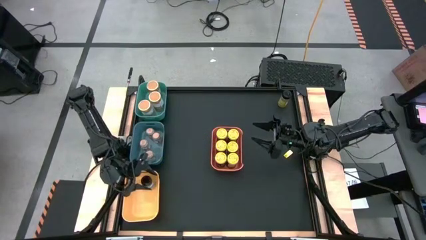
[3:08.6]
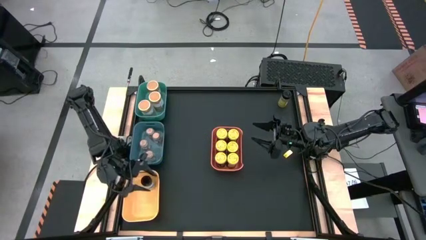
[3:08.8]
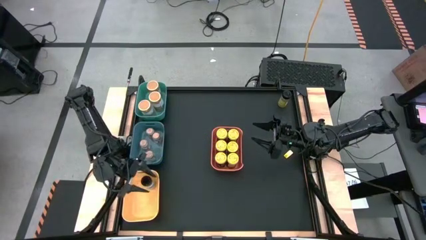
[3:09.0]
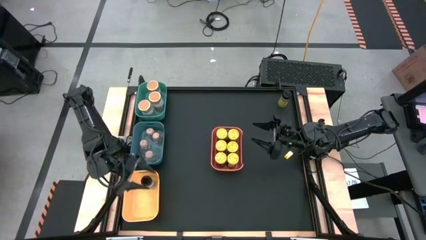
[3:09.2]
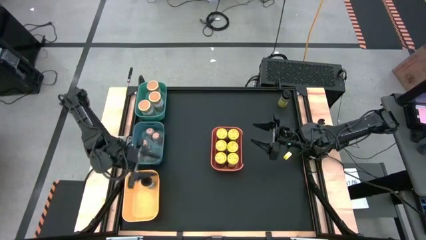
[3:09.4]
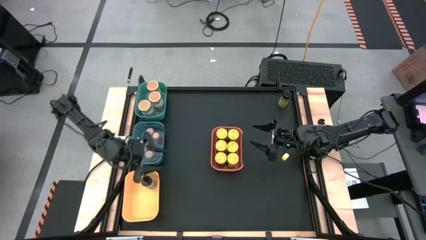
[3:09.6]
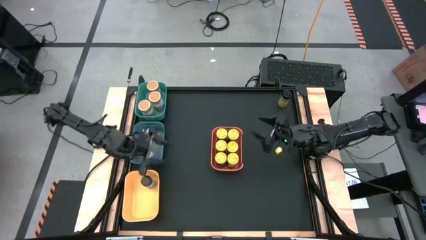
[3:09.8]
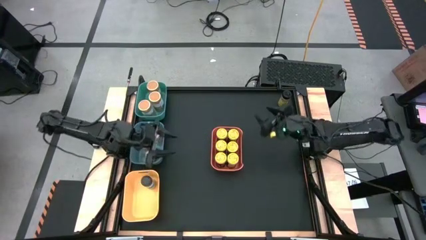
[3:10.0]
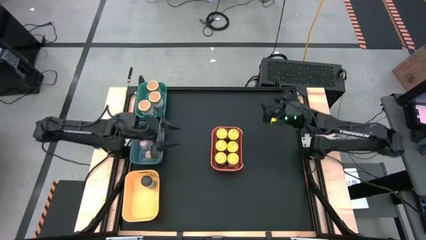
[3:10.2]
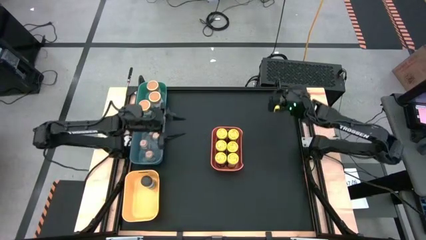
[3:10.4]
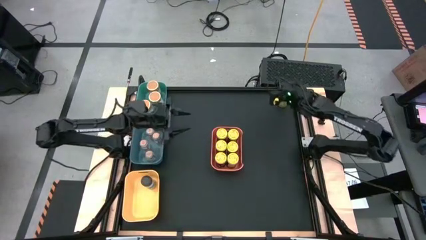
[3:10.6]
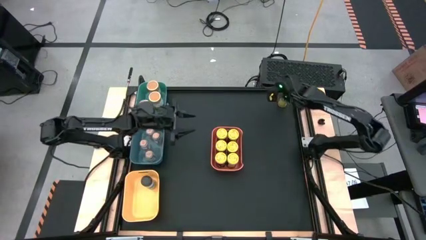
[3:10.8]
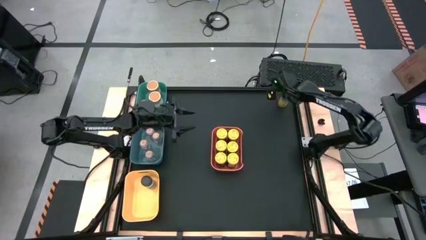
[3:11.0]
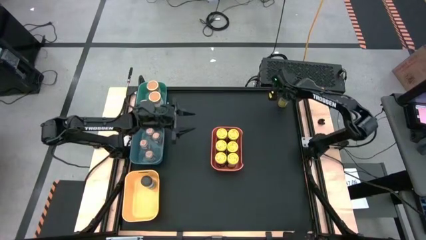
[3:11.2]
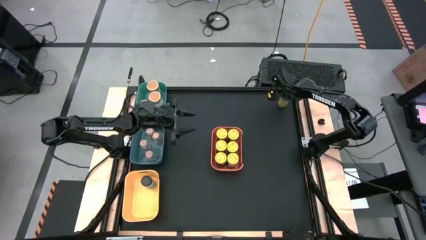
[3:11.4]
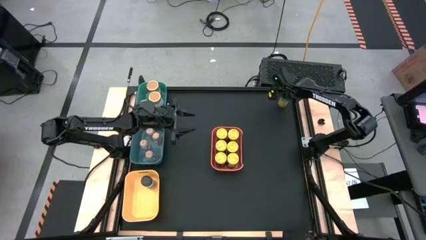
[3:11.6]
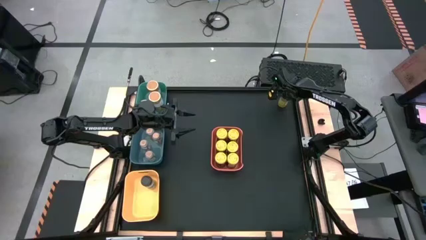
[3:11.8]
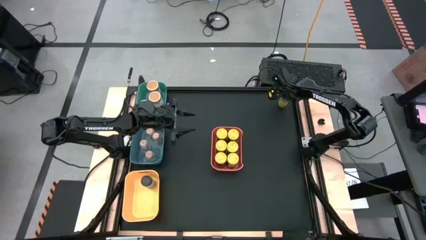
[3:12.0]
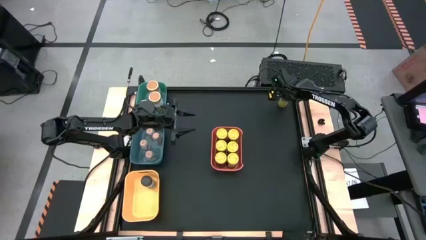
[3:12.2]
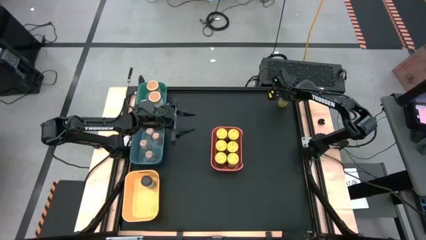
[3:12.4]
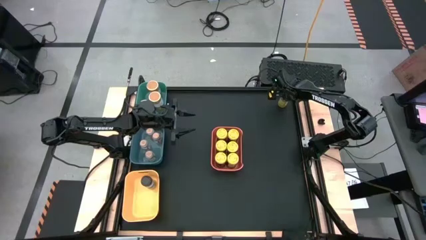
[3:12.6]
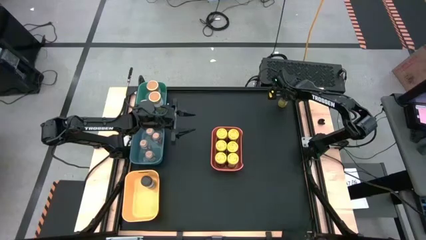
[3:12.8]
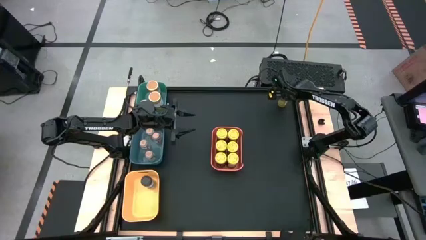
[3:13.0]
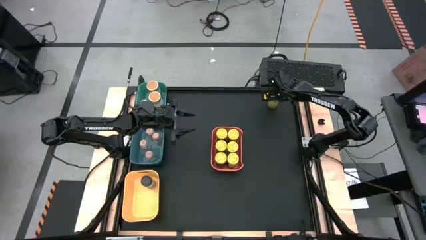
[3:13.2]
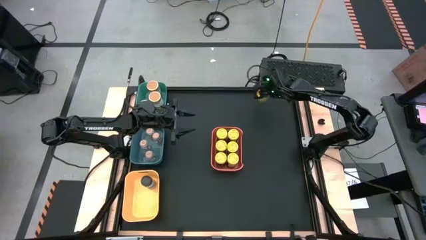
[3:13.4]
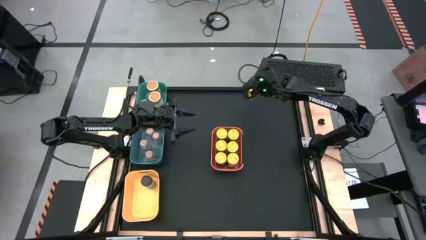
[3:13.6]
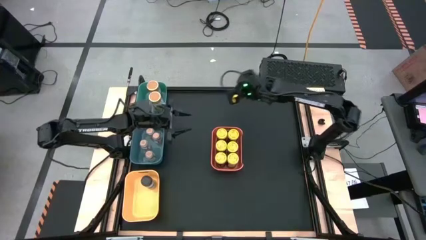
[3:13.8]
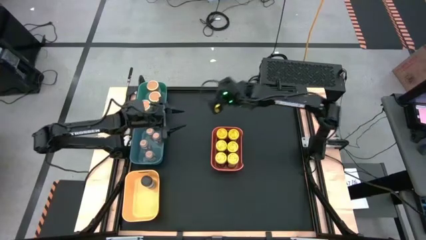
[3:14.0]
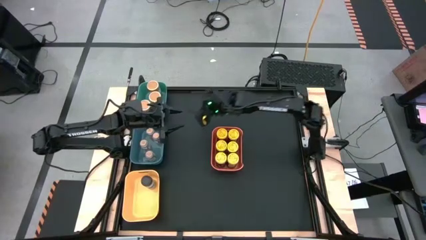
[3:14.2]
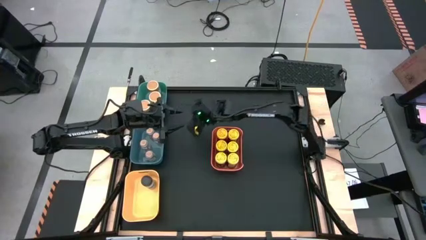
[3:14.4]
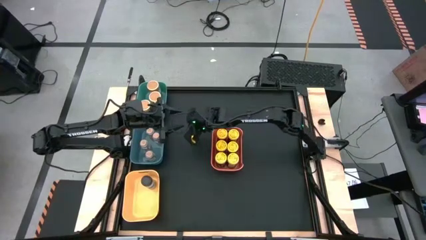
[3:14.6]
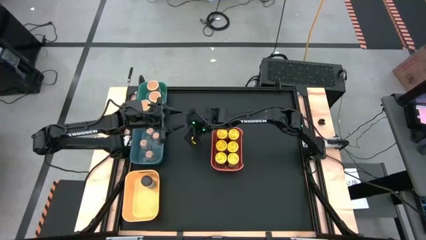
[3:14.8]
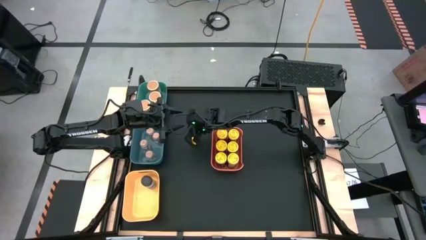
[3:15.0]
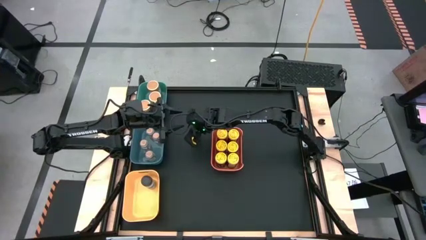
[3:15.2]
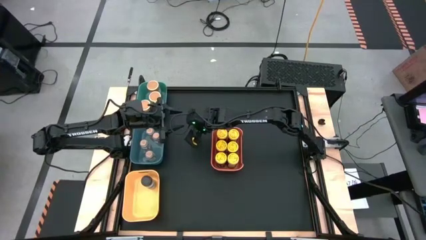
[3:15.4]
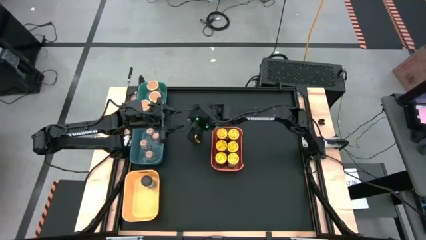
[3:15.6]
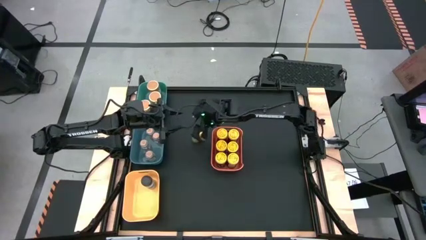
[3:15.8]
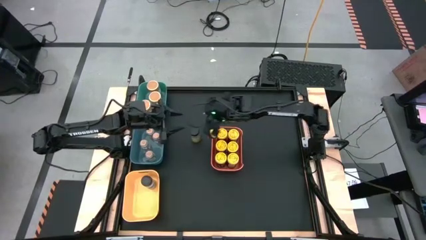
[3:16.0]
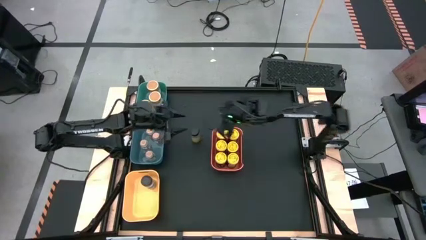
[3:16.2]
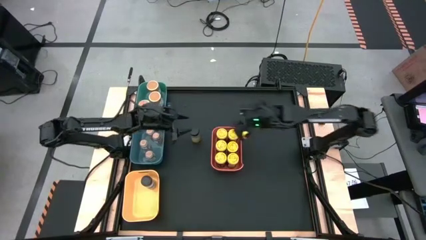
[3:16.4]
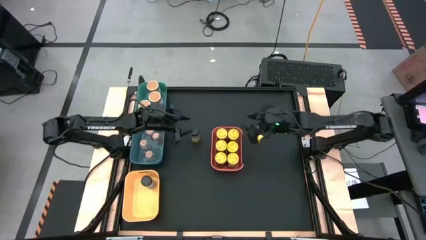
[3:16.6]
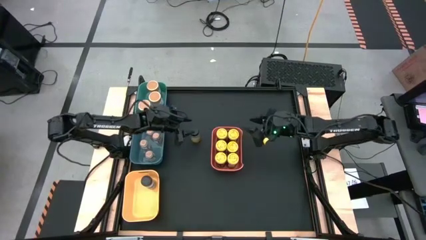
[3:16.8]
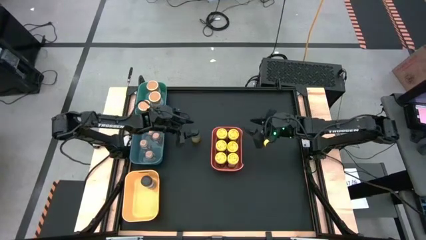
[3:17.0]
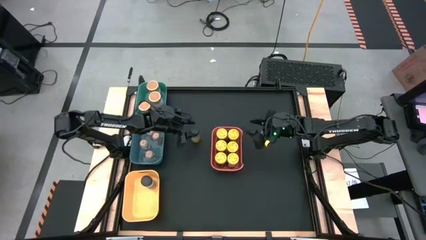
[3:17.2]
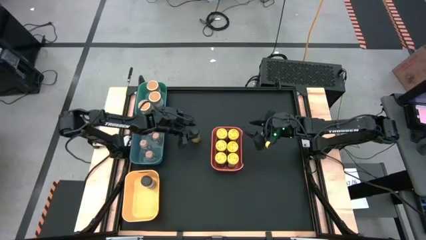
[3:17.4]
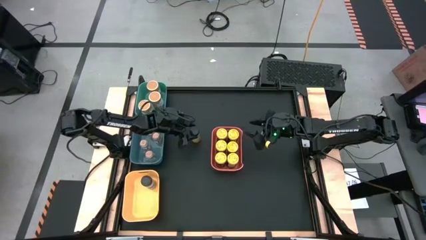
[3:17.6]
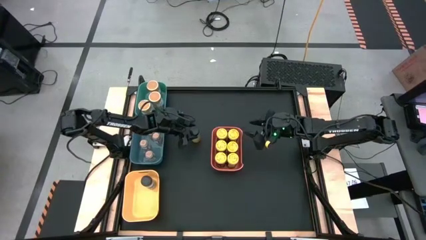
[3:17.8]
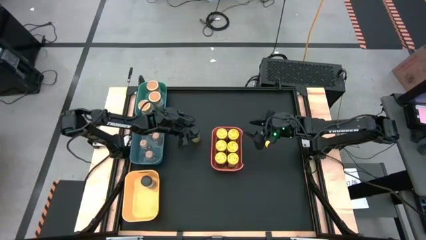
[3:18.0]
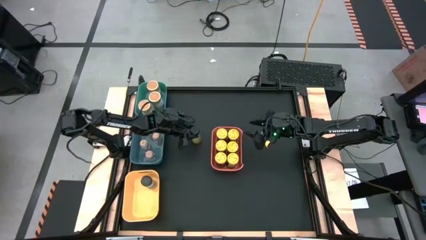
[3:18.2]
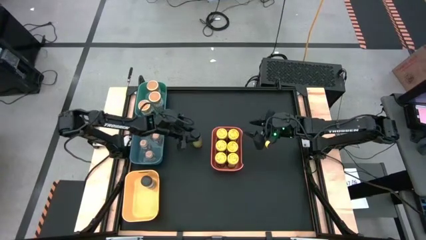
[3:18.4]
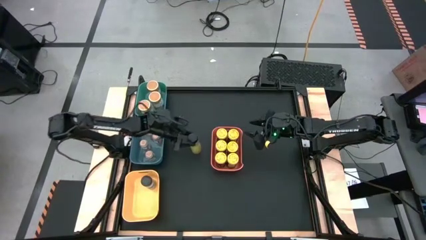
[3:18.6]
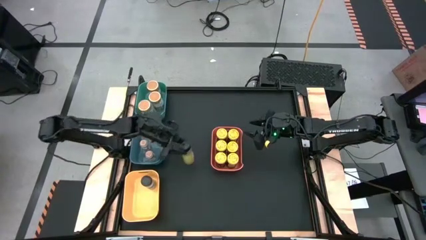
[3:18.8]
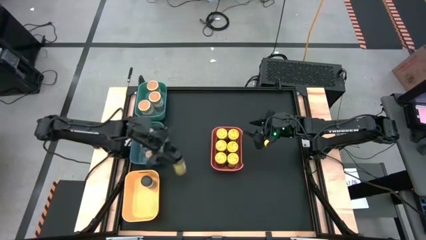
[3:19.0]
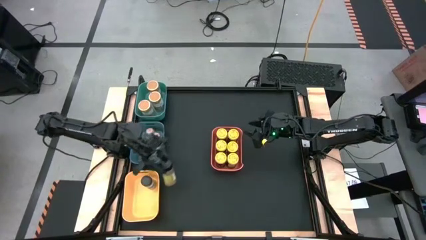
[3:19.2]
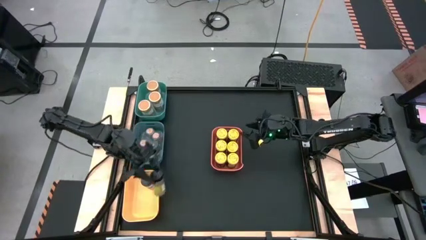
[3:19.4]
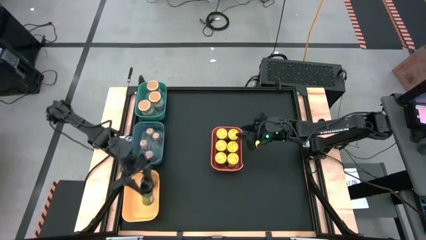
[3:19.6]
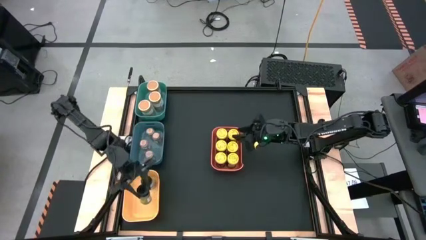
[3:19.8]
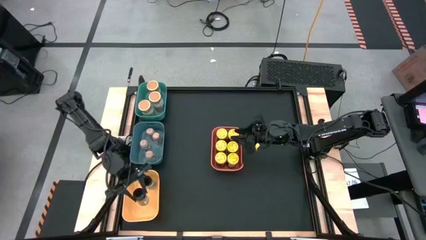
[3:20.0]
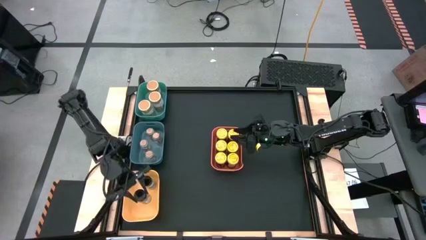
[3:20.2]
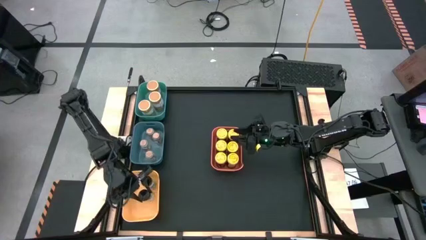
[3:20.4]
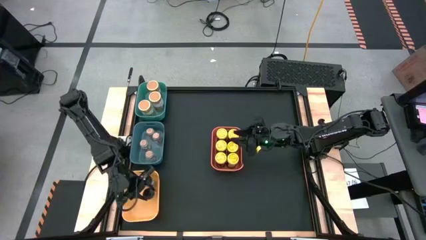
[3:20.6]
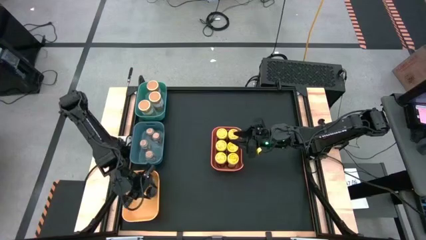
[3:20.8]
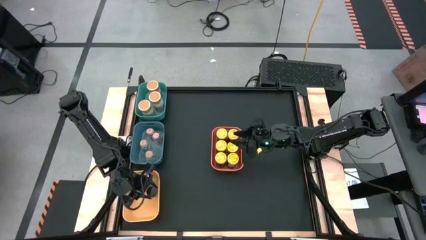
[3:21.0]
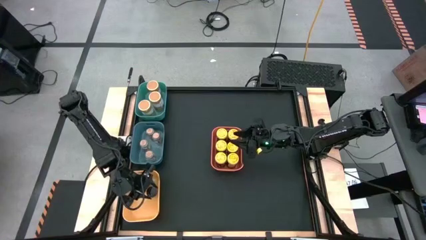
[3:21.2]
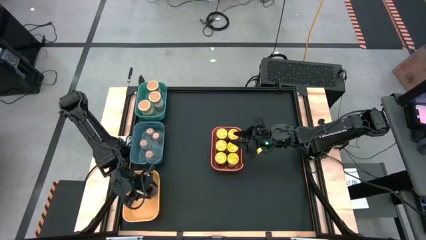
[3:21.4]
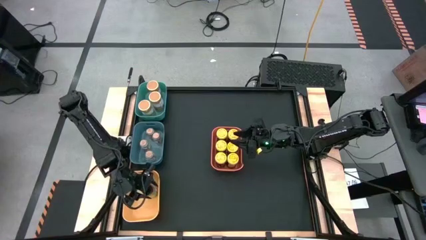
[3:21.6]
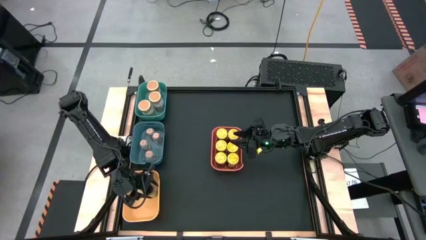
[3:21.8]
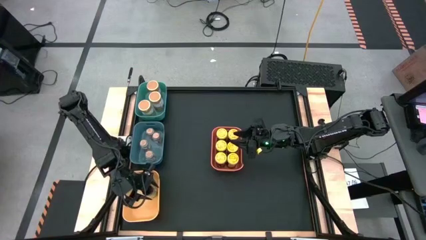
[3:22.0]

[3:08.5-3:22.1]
Task: Sort spices by type
Put the seasoning bottle into the yellow bin
